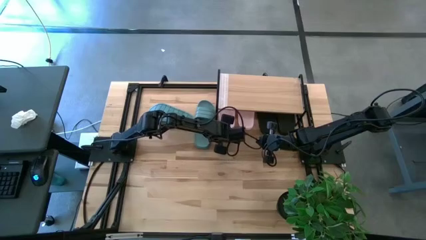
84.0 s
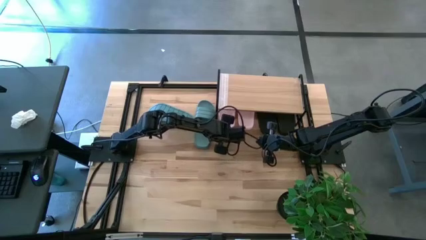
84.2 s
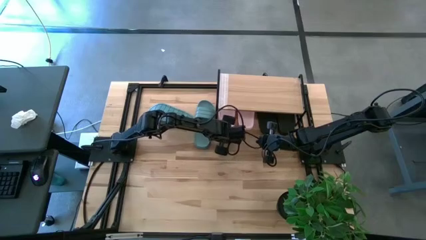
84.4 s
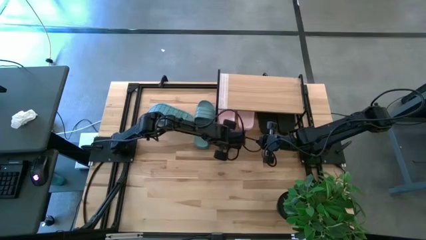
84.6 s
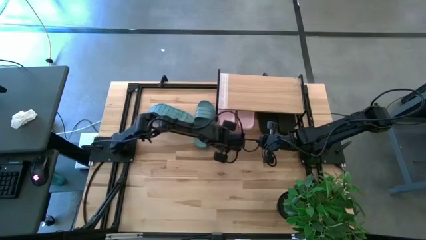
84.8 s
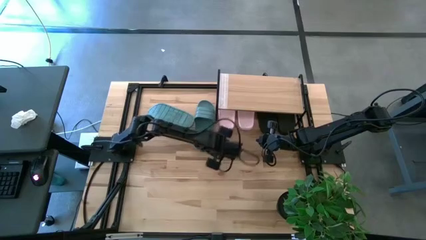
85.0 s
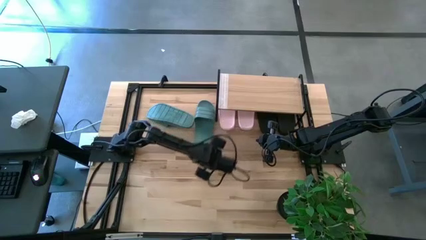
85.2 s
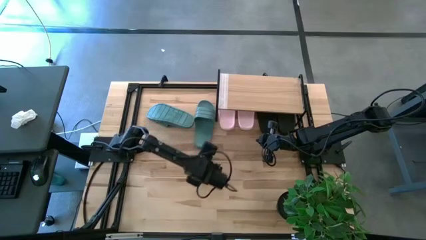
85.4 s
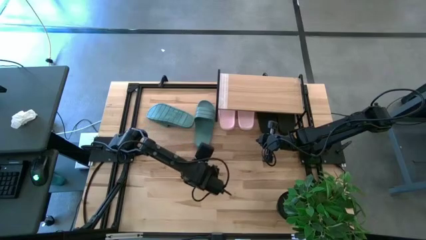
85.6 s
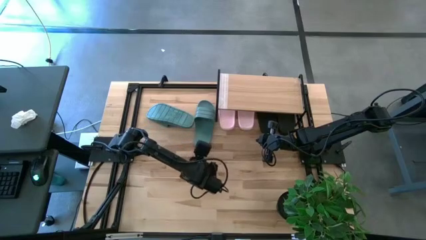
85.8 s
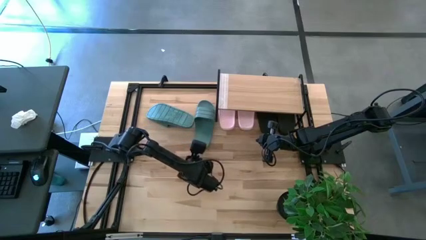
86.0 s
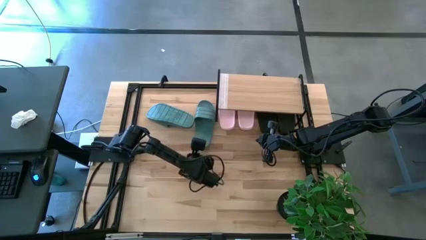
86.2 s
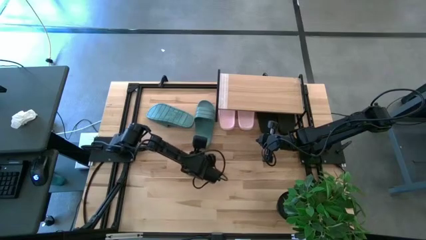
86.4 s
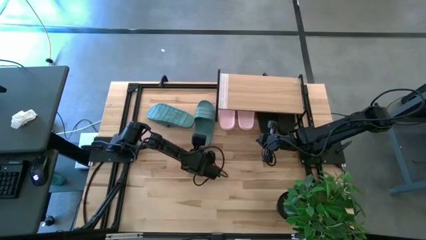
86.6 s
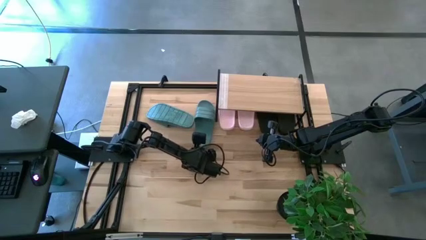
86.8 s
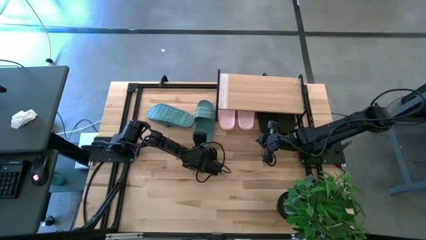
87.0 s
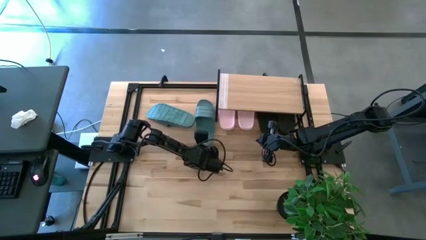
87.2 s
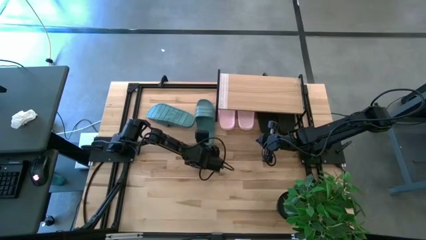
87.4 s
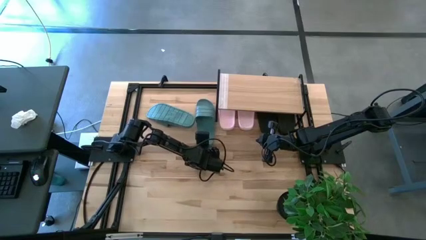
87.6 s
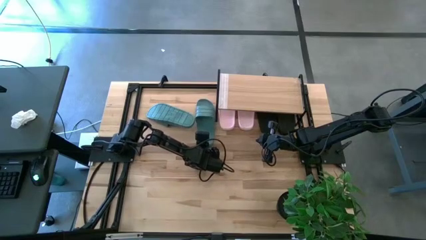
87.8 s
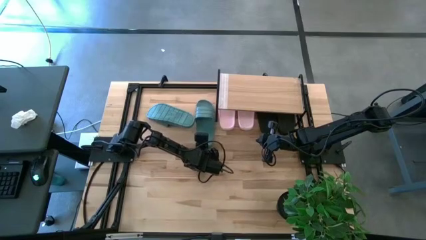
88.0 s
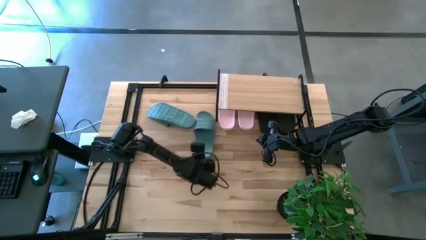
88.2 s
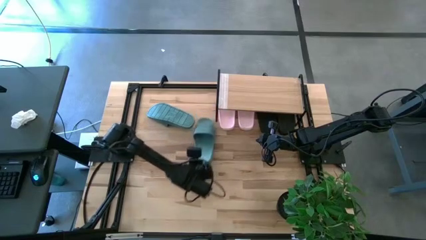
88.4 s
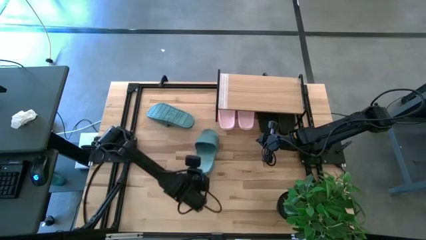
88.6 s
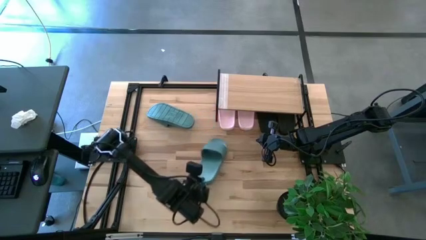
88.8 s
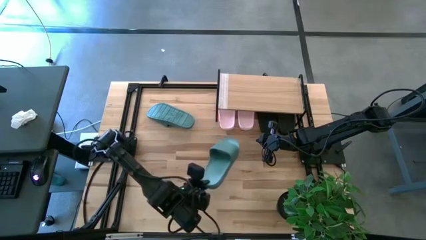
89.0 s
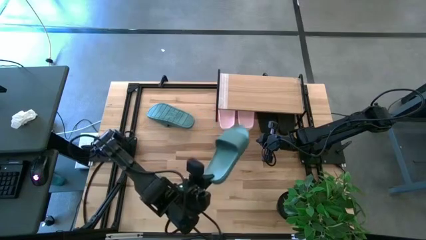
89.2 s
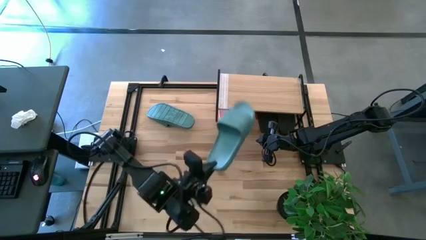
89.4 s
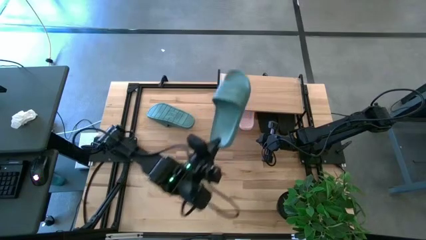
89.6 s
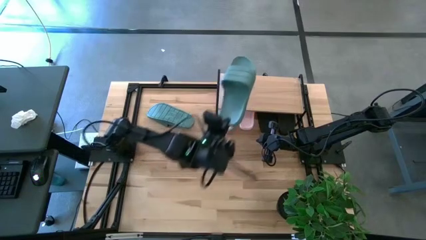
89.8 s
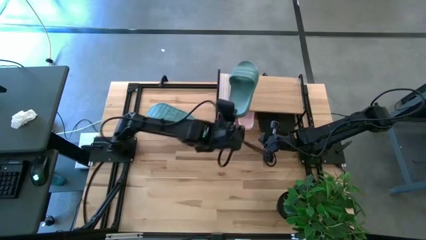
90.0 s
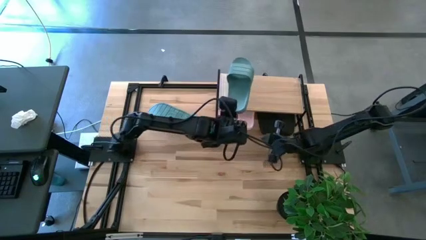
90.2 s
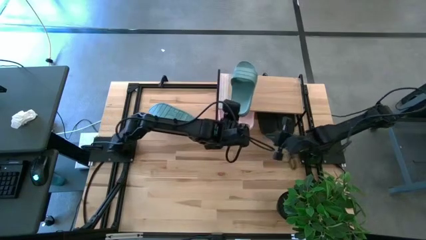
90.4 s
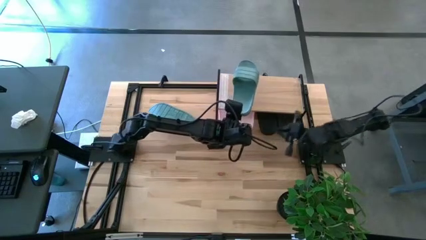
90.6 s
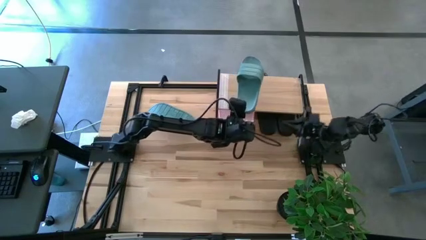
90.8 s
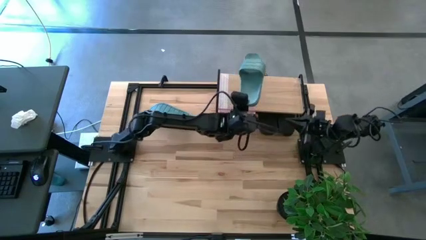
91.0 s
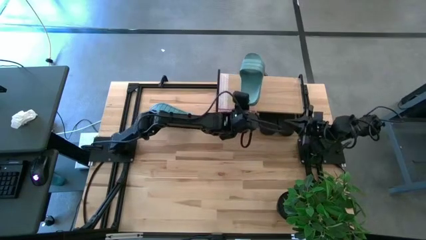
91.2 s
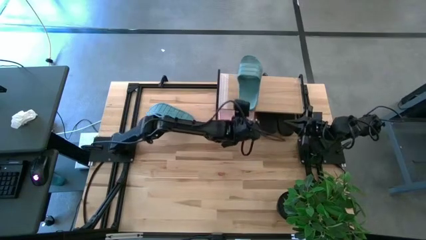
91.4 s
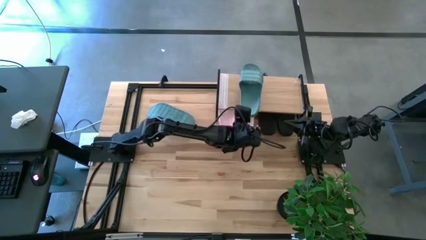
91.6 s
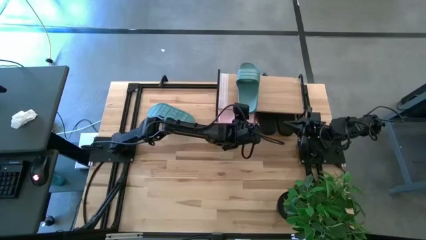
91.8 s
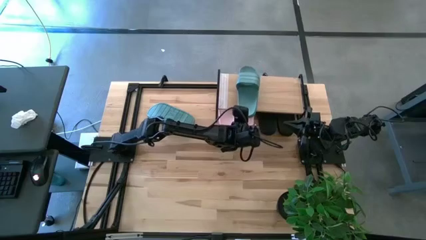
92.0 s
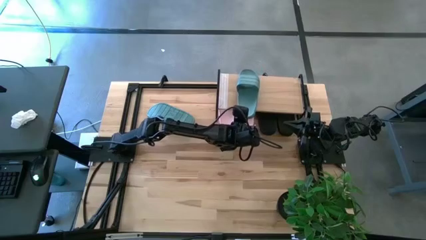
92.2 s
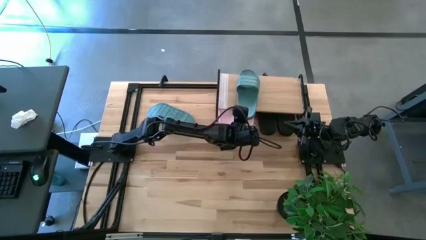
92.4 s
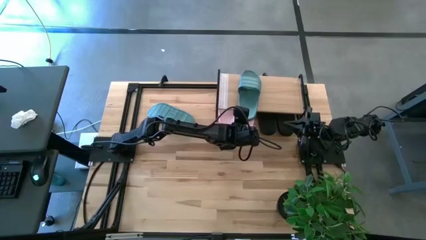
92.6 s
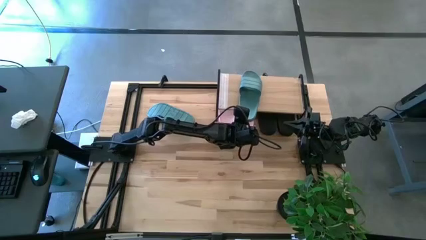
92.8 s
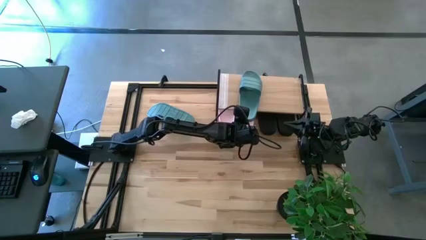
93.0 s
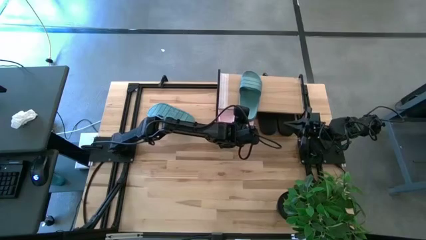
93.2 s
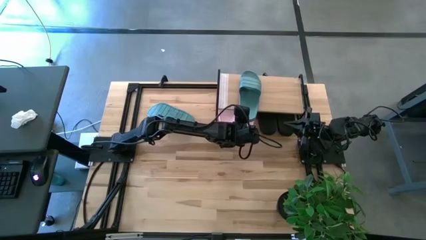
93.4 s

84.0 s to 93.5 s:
Task: Pick and place slides into the shelf
Put the right green slipper on the shelf

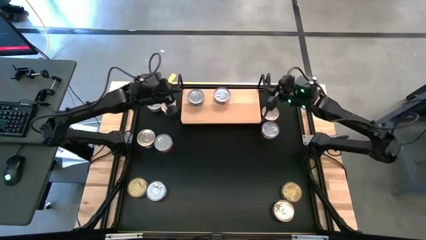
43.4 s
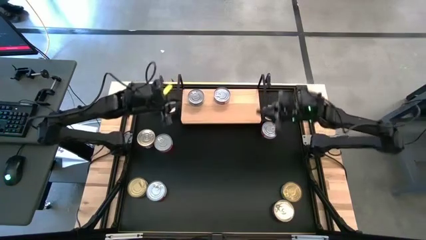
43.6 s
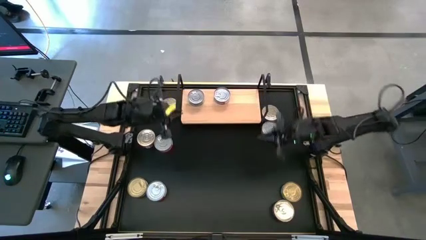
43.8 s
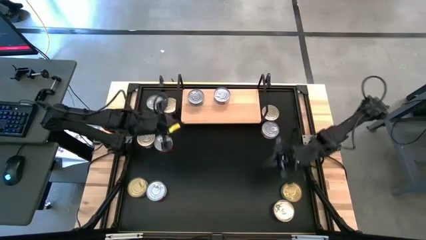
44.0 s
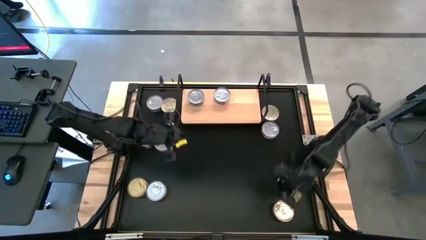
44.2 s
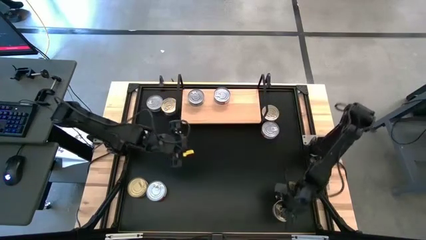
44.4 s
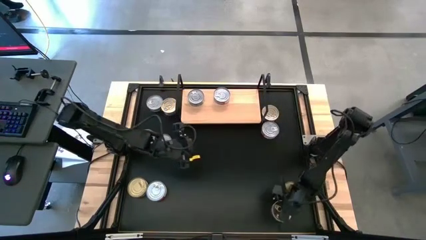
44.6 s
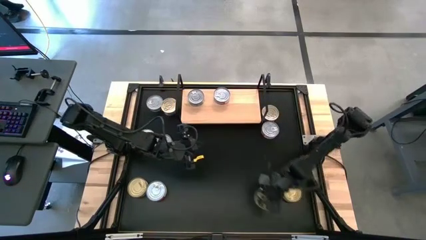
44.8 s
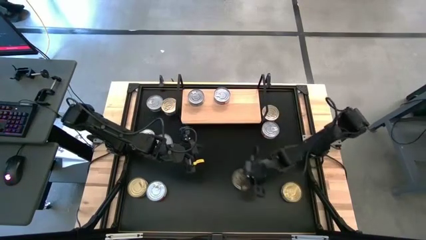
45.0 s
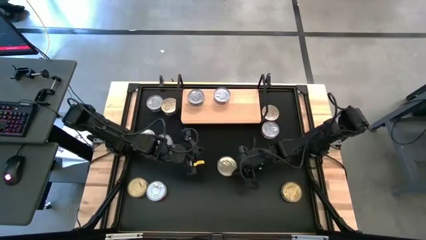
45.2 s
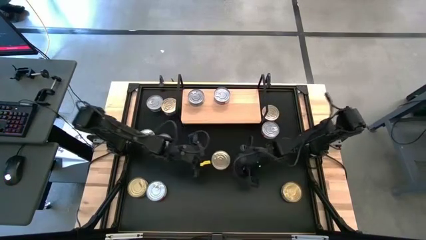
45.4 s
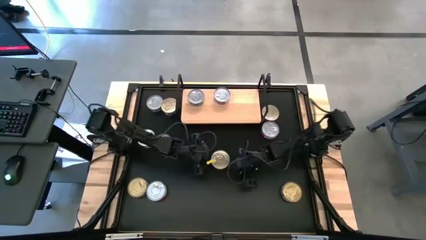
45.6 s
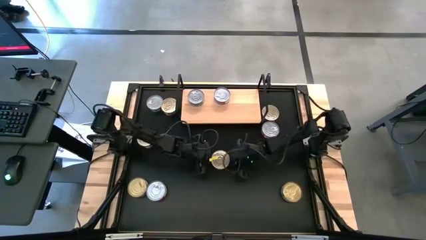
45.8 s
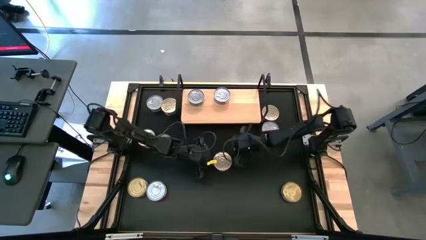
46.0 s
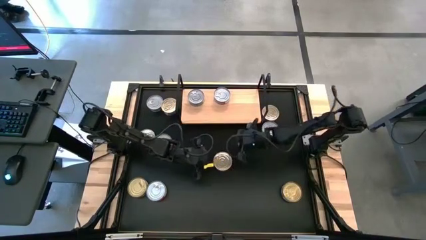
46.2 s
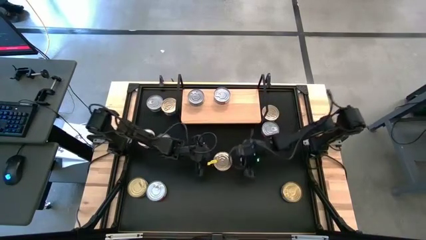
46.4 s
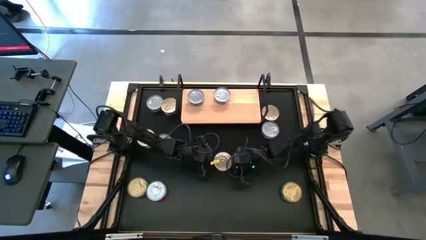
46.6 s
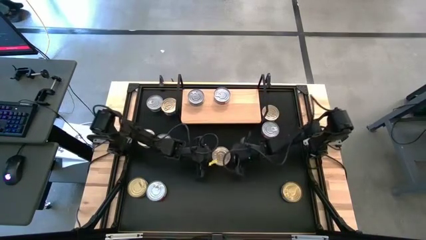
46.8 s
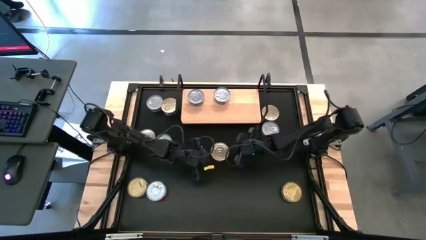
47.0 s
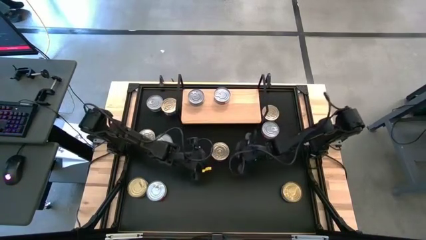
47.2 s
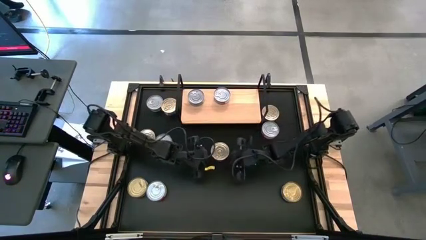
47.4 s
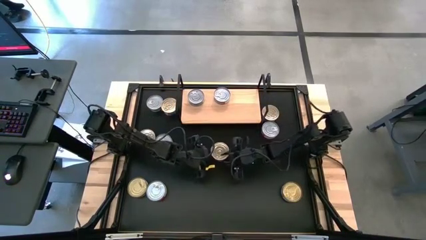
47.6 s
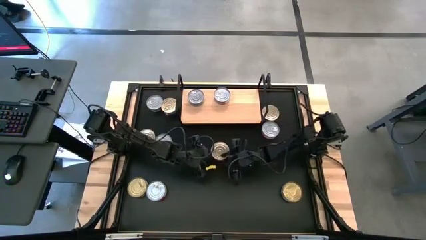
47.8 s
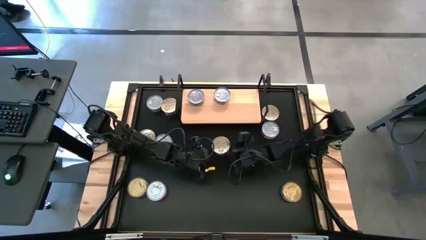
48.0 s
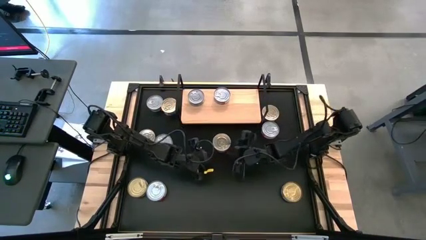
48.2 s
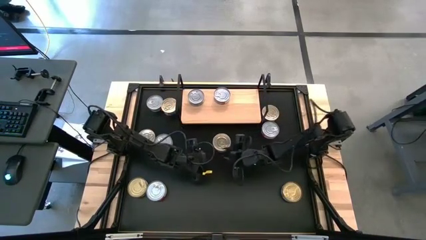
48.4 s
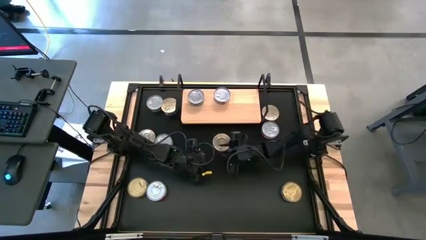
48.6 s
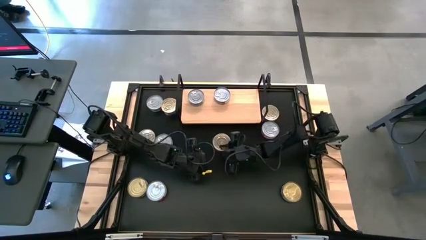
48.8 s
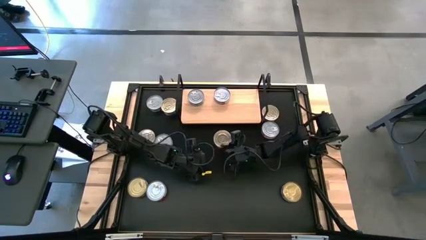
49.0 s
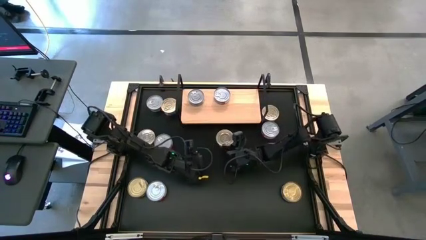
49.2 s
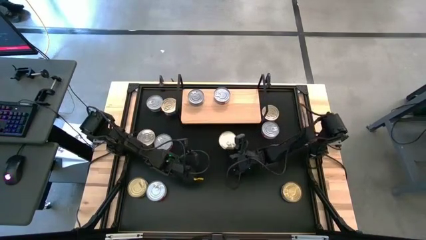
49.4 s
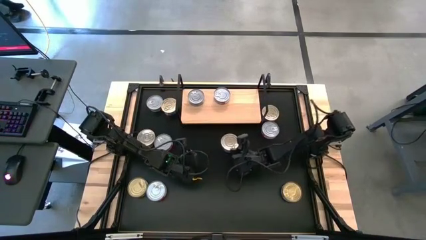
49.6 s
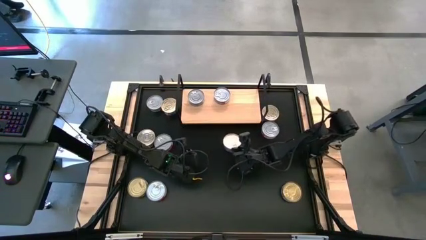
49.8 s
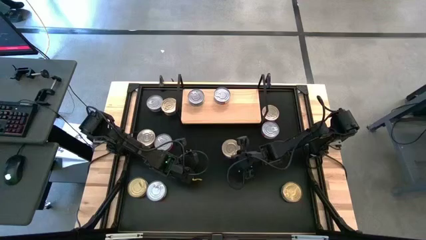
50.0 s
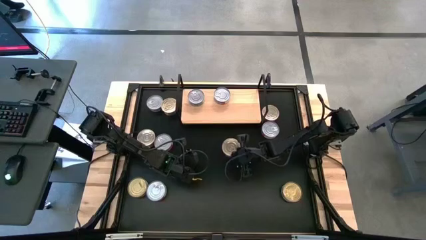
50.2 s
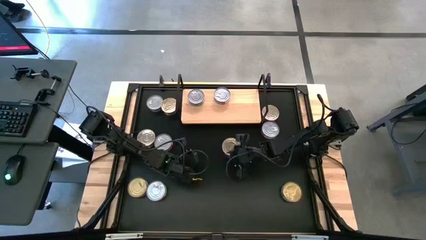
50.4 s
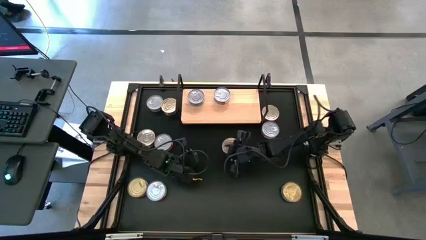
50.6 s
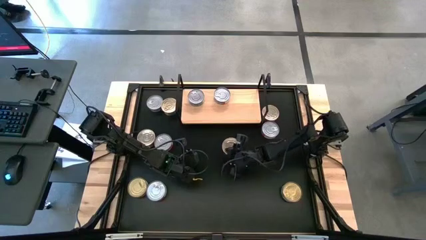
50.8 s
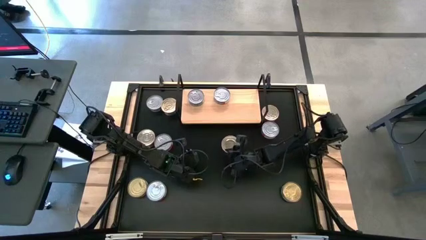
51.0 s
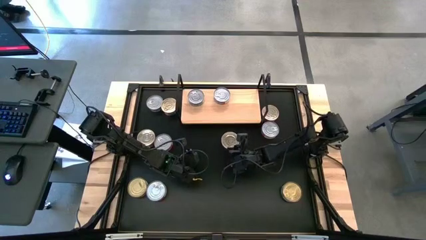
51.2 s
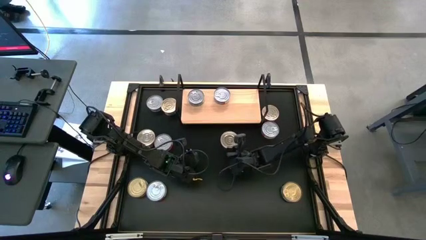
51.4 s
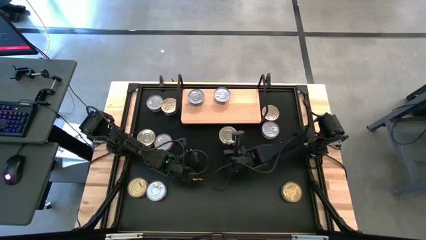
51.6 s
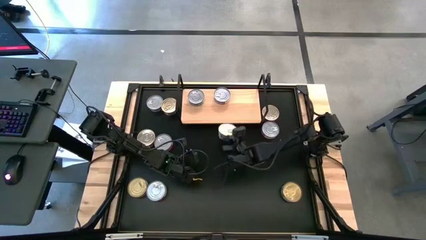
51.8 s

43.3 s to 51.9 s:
Task: Stack canned seafood by type on shelf
Put the blue tuna can on the shelf
